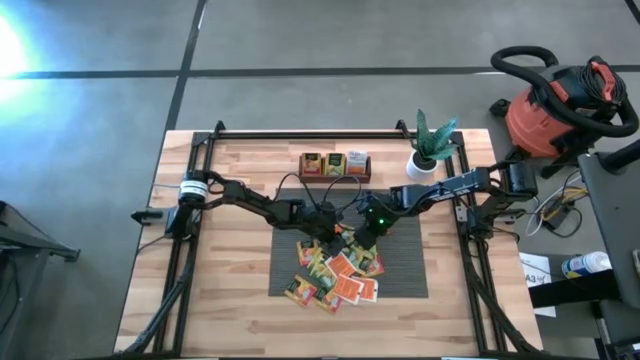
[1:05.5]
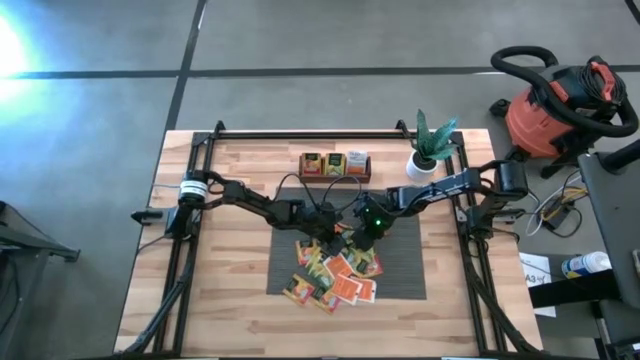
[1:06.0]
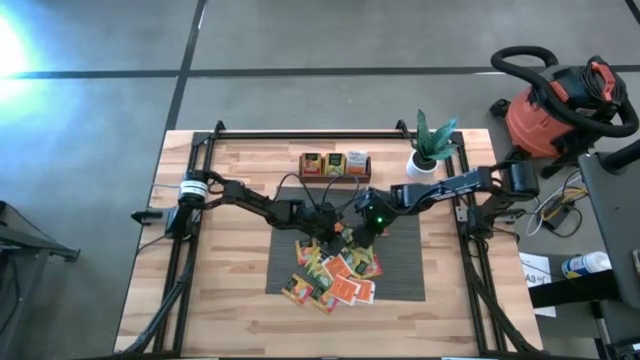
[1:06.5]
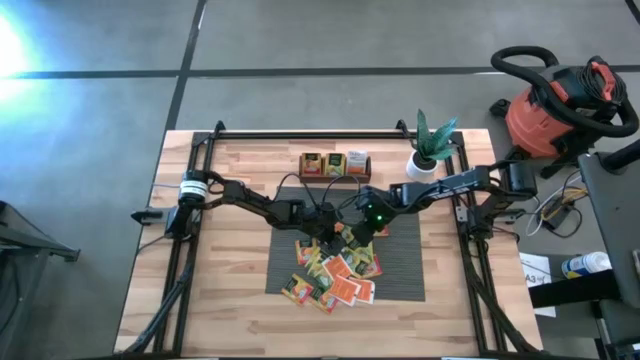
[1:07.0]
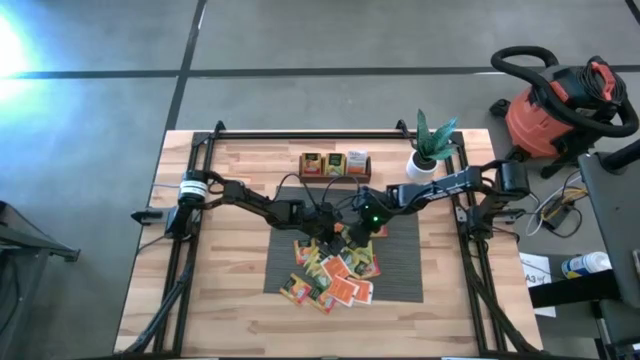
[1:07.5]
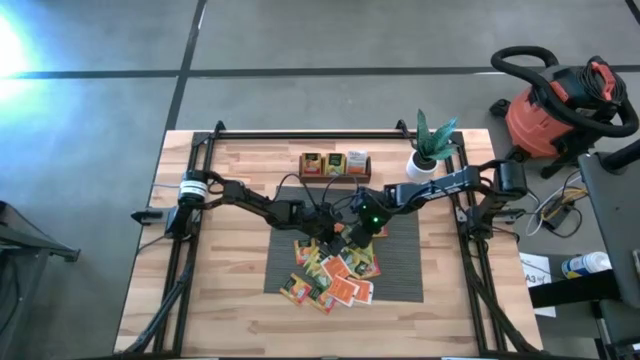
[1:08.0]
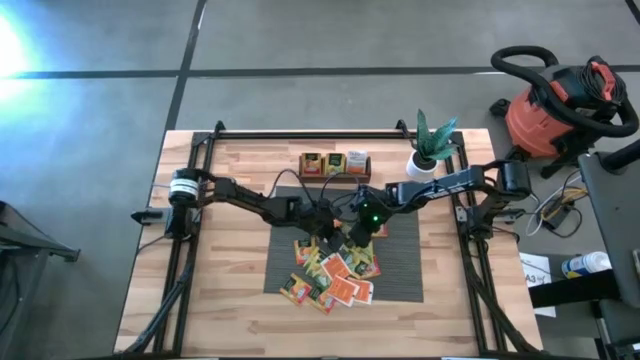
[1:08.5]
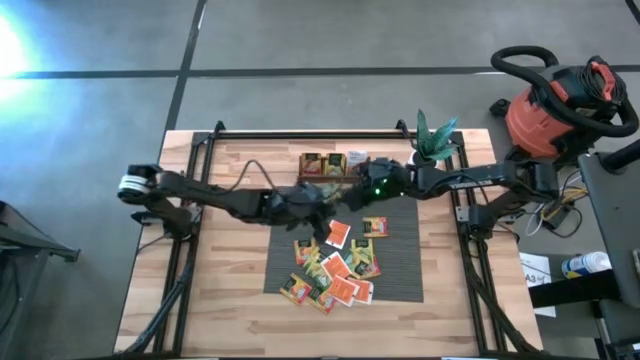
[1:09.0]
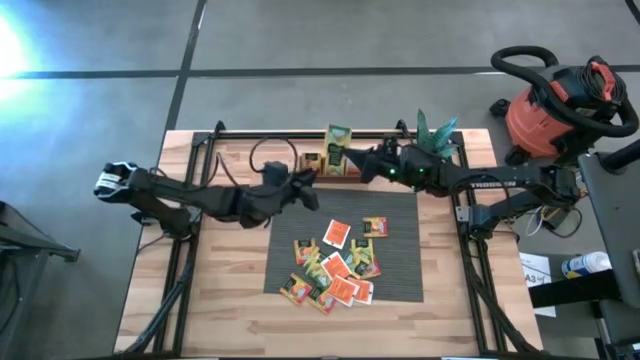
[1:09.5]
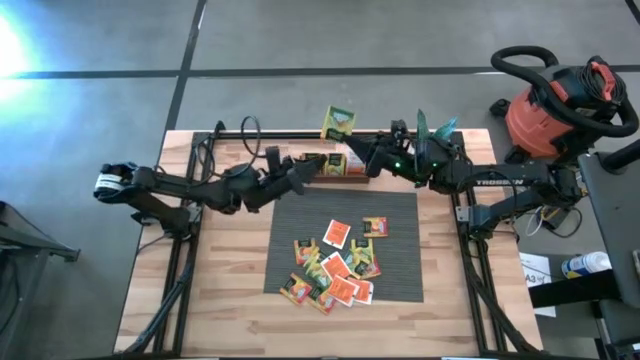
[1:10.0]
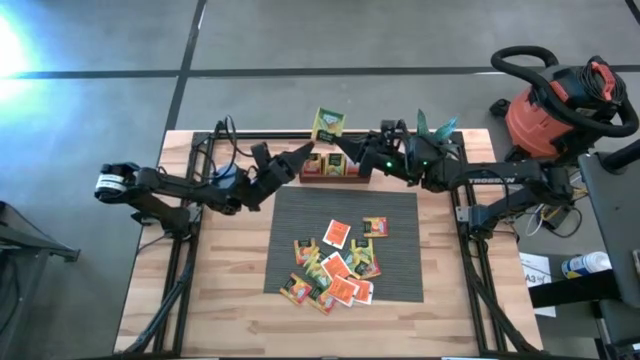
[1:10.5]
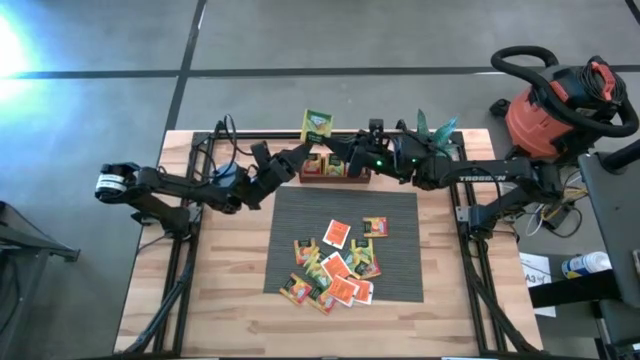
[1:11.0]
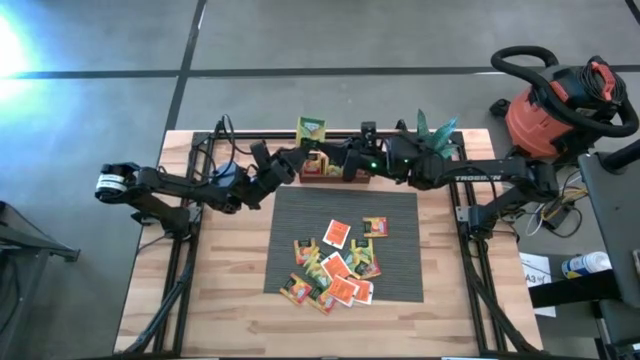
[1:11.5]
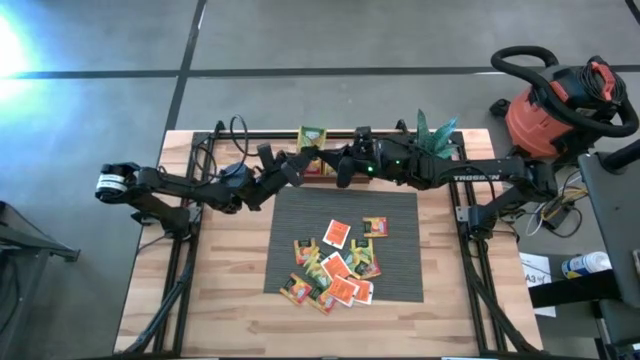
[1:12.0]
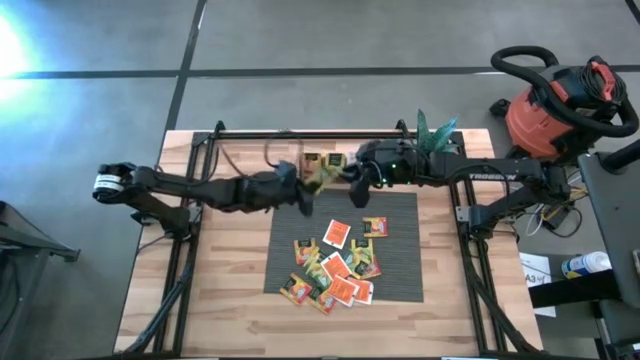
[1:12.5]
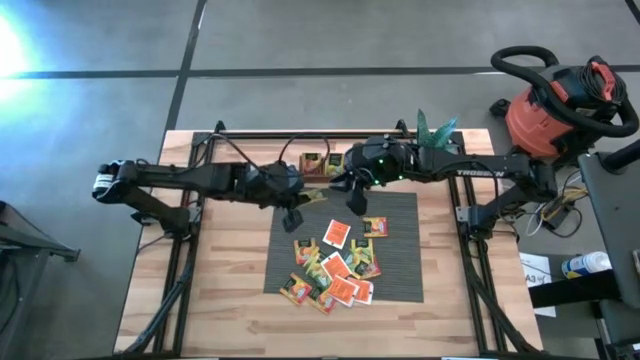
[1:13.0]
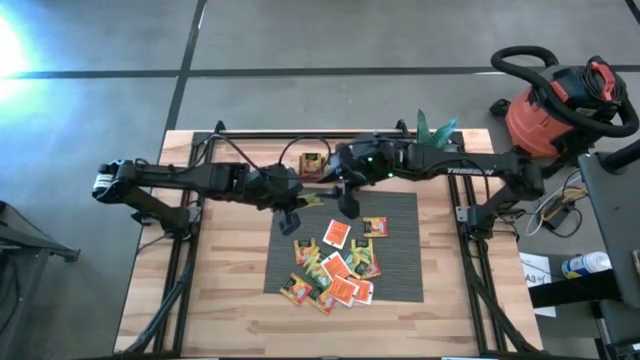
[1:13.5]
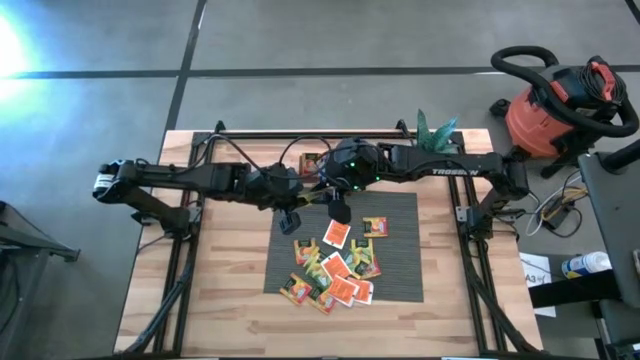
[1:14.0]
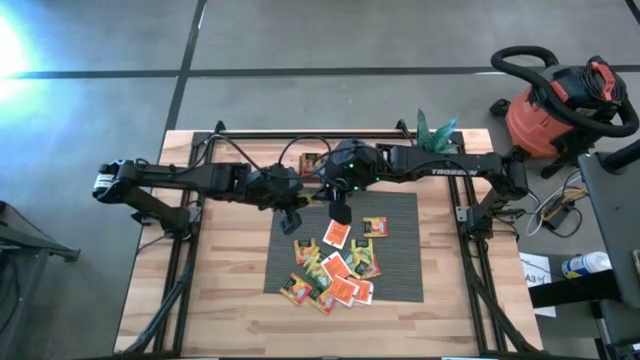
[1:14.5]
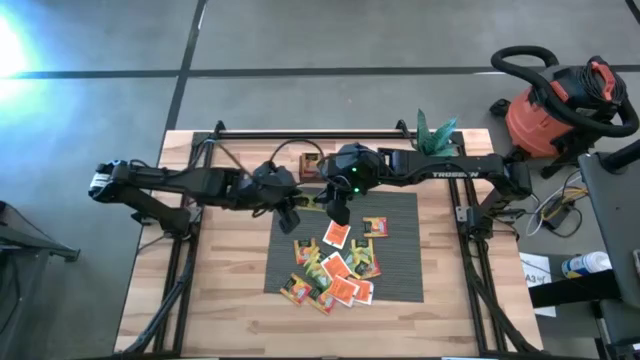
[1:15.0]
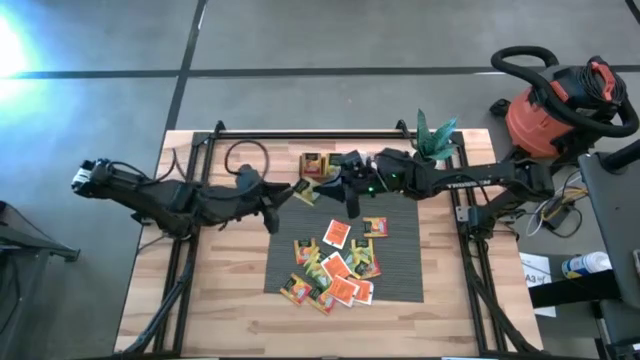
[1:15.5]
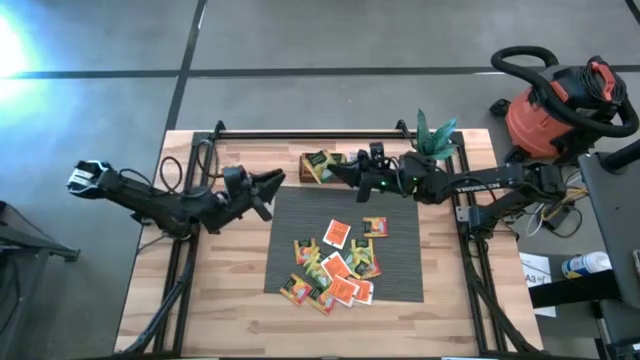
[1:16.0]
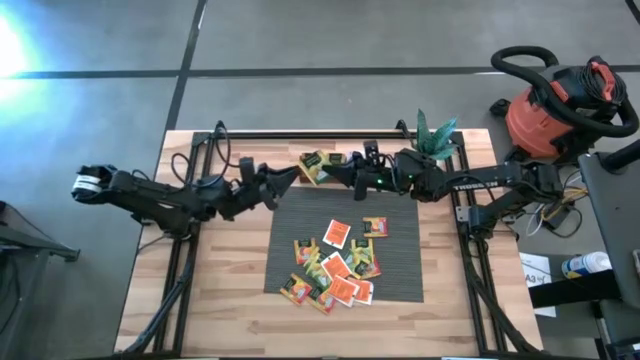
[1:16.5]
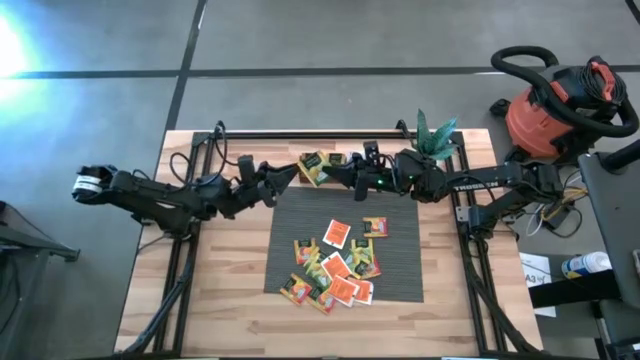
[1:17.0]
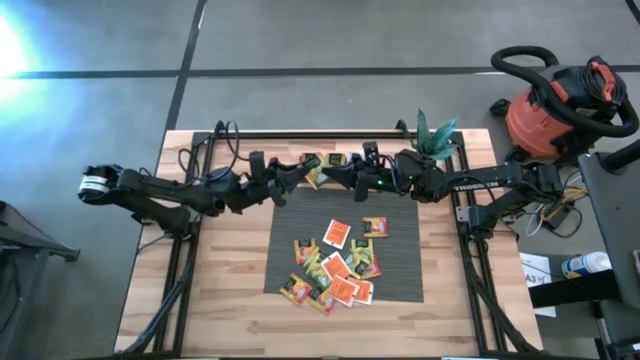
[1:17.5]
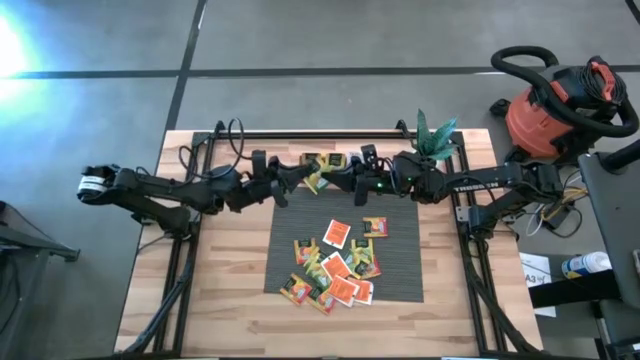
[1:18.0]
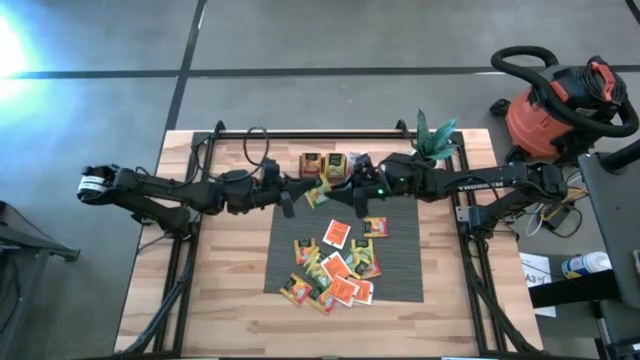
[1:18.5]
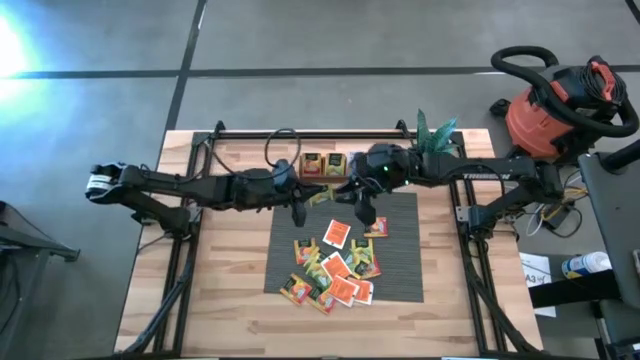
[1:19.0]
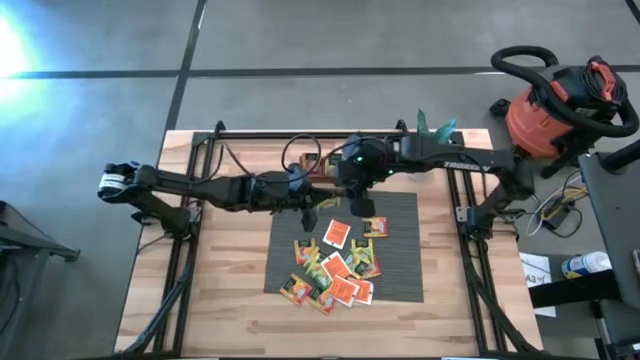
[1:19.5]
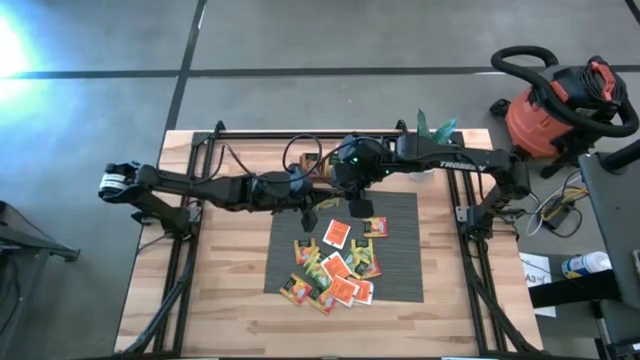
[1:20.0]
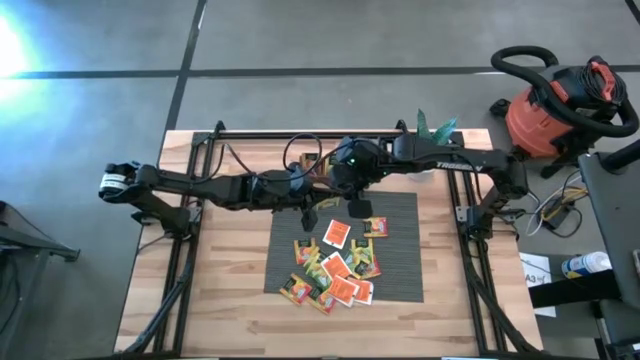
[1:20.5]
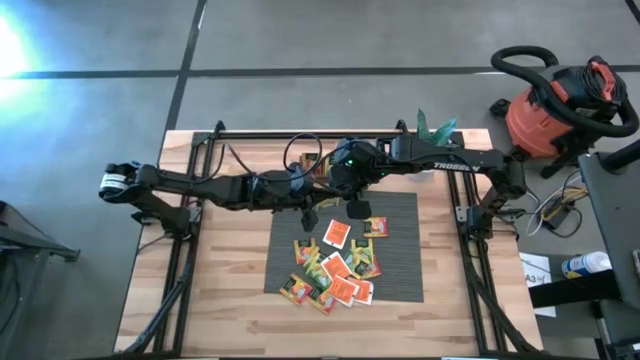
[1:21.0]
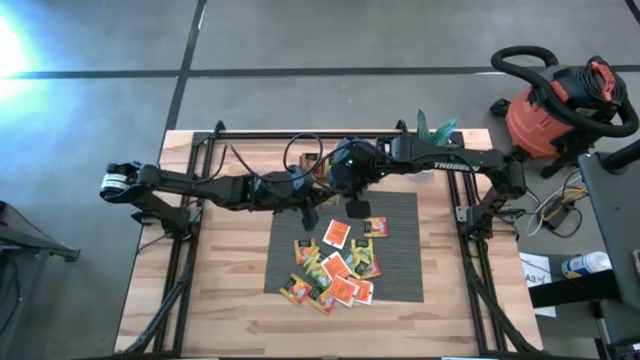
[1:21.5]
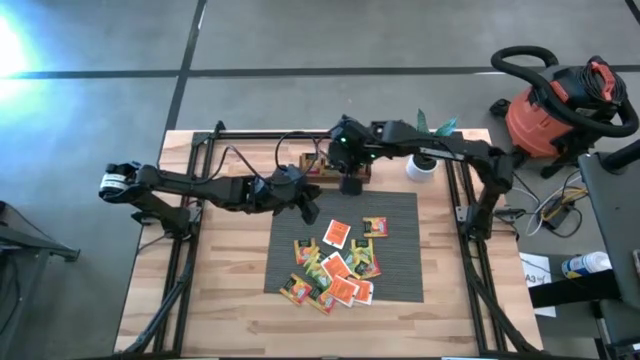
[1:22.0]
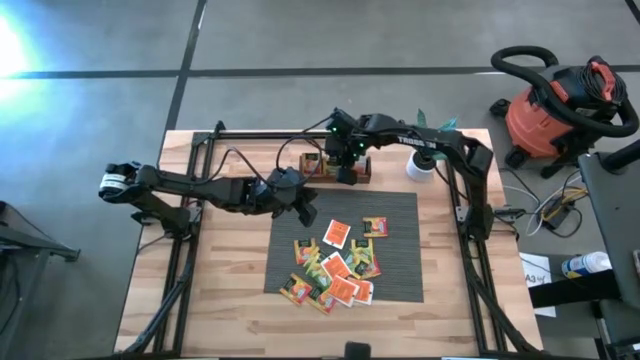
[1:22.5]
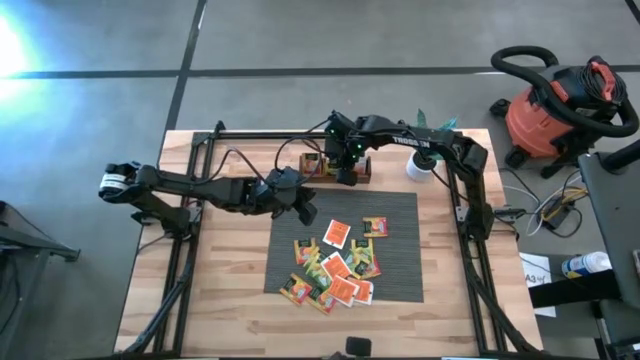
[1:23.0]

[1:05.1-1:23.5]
Task: Pick & Place Tea
Put the yellow tea bag into the middle section of the wooden organizer

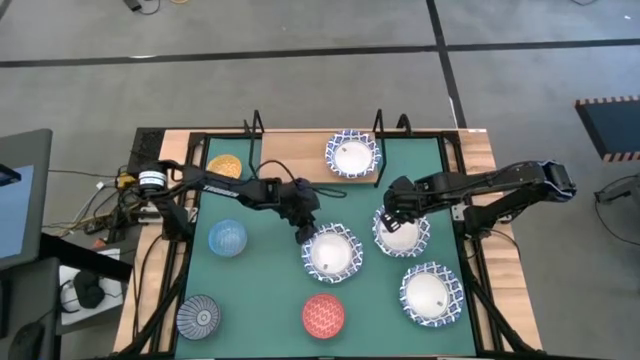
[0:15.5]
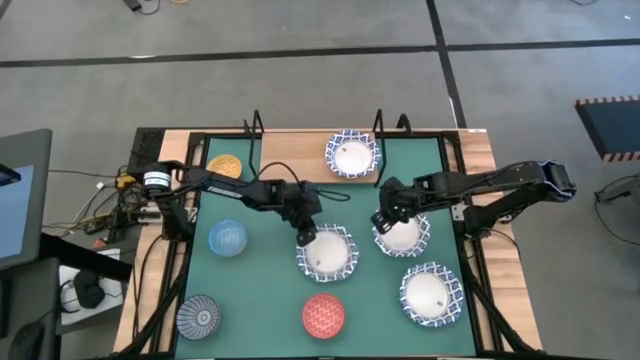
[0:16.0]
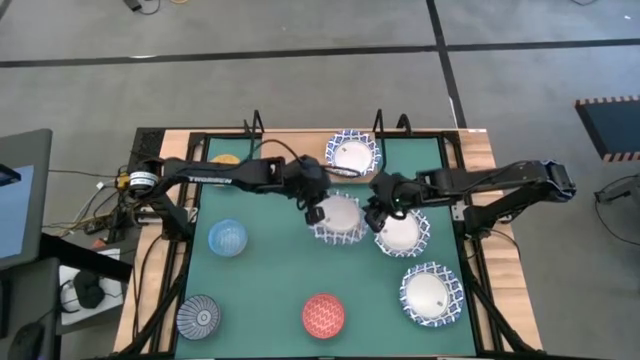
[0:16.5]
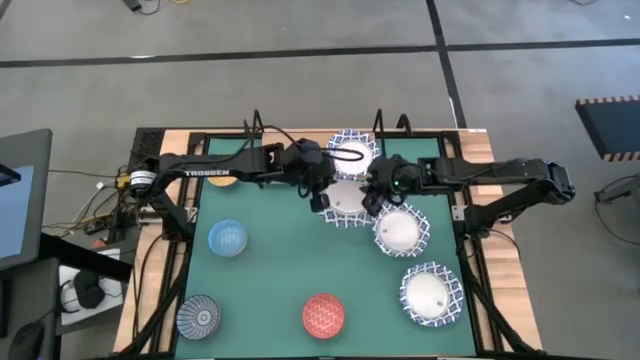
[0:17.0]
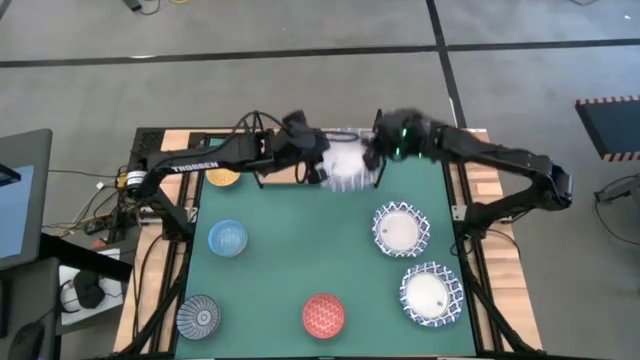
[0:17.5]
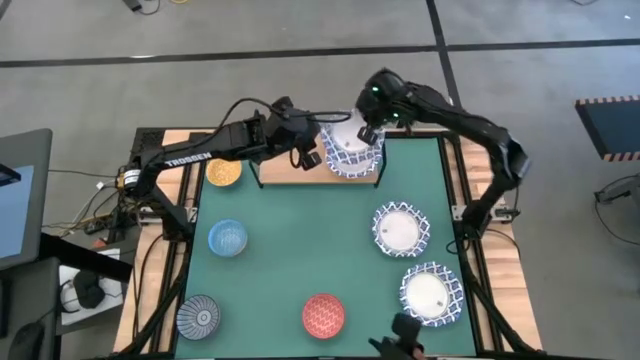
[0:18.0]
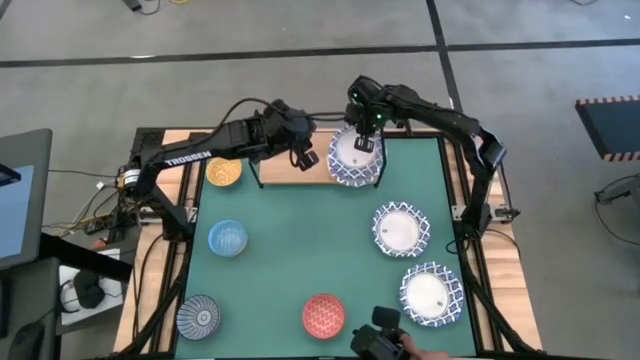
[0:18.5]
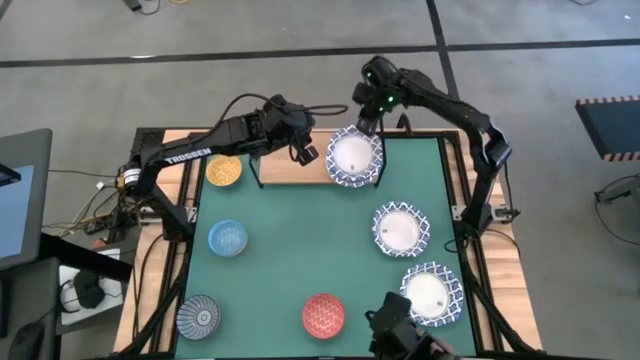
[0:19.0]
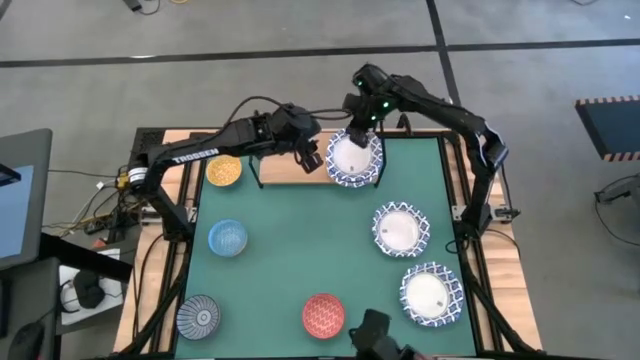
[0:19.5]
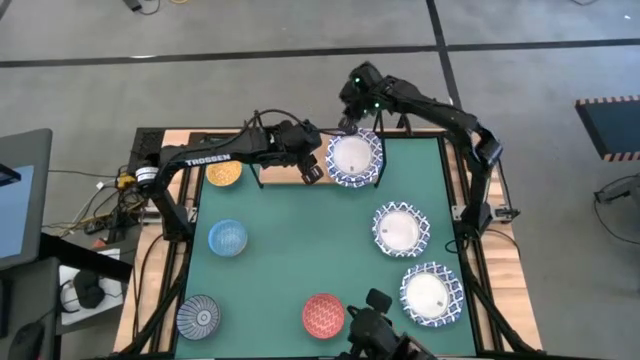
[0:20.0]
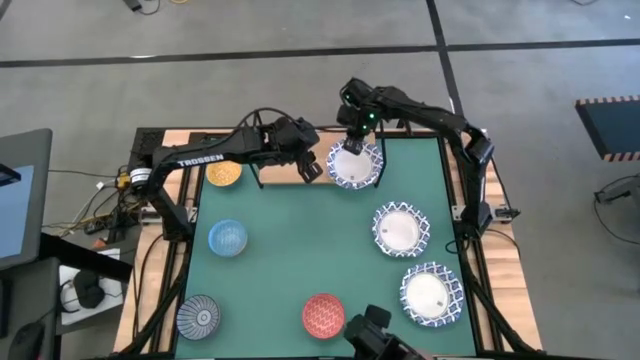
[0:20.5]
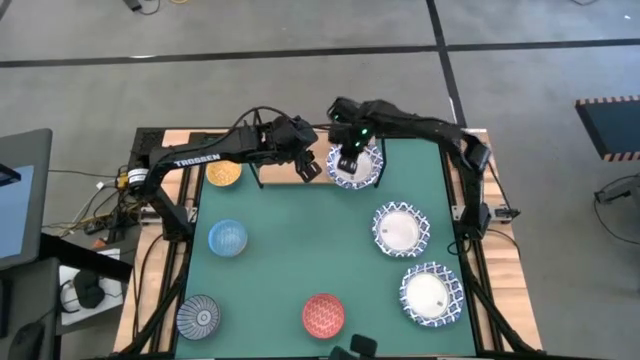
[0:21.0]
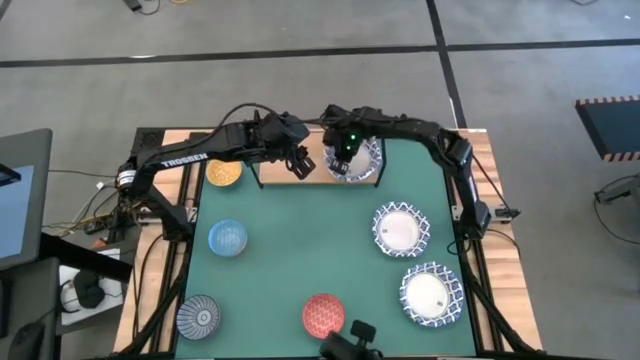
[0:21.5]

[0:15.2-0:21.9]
Task: Place and stack bowls onto a shelf
Stack the white bowl on top of the other white bowl on the shelf
